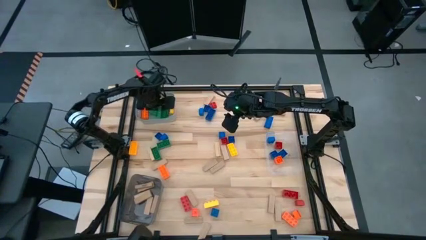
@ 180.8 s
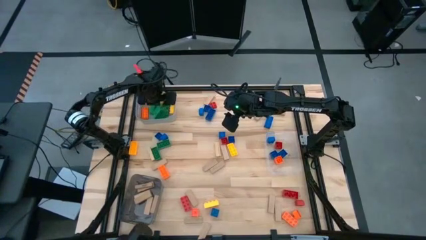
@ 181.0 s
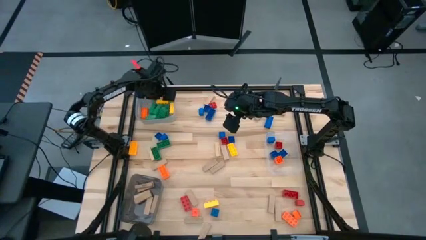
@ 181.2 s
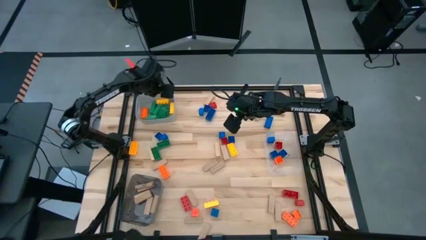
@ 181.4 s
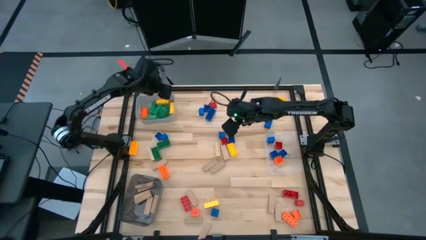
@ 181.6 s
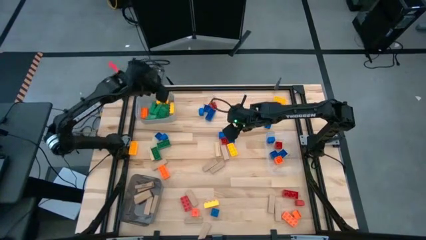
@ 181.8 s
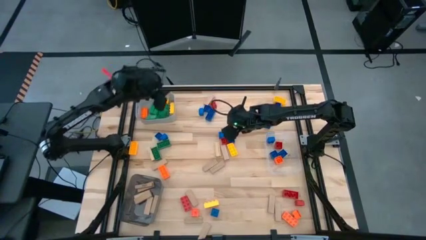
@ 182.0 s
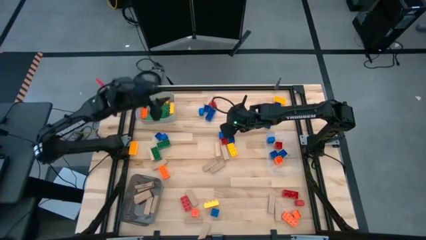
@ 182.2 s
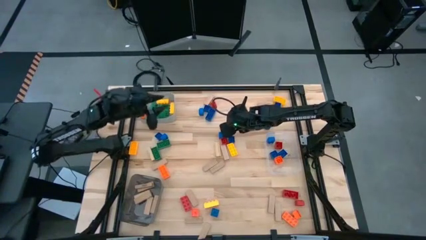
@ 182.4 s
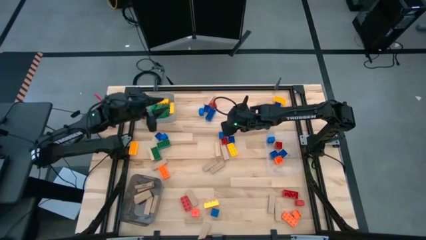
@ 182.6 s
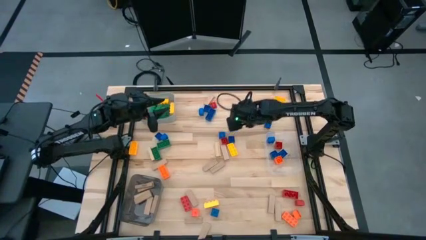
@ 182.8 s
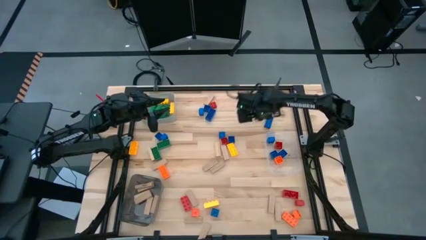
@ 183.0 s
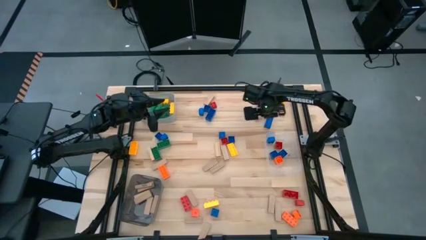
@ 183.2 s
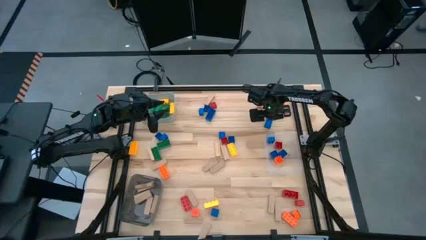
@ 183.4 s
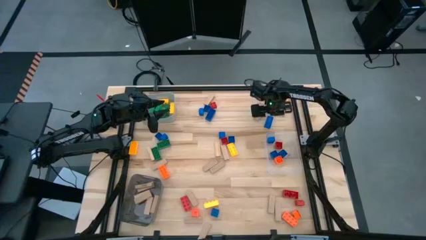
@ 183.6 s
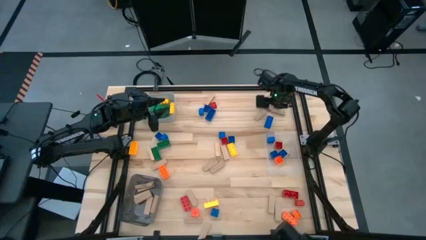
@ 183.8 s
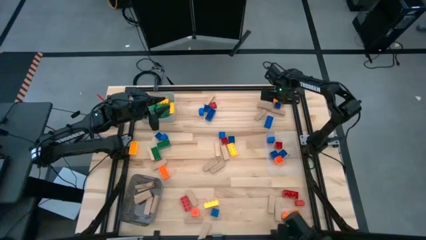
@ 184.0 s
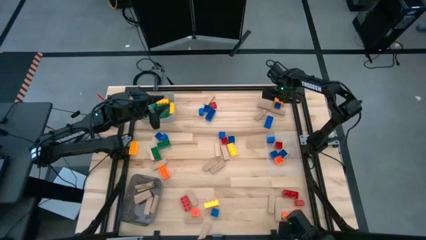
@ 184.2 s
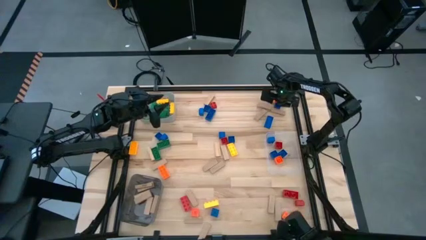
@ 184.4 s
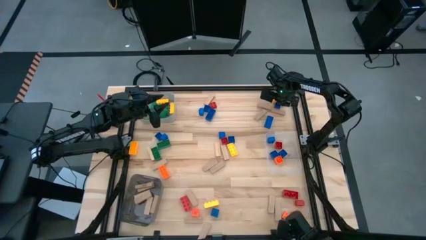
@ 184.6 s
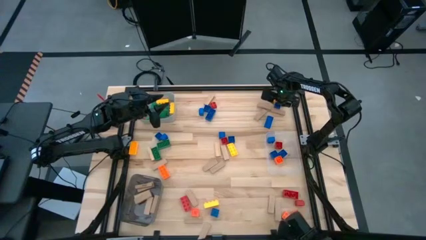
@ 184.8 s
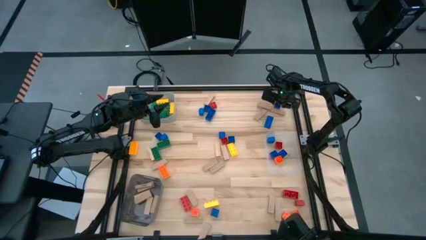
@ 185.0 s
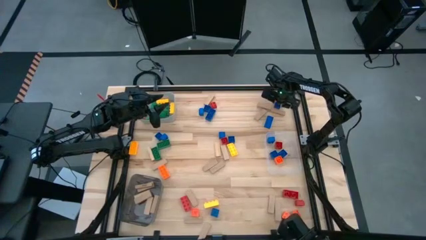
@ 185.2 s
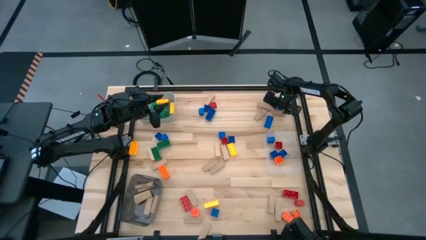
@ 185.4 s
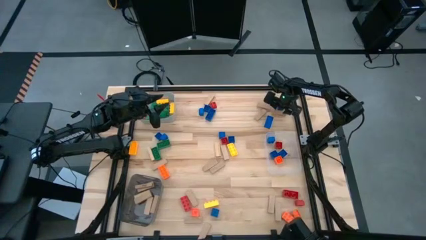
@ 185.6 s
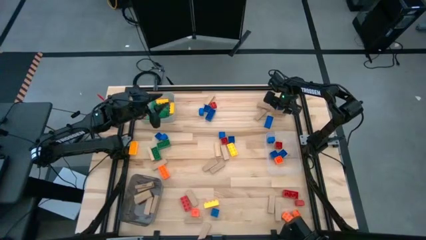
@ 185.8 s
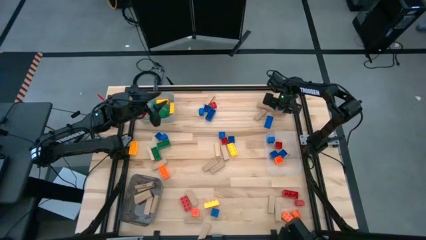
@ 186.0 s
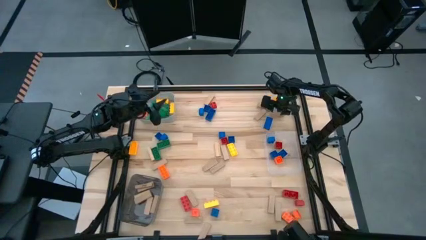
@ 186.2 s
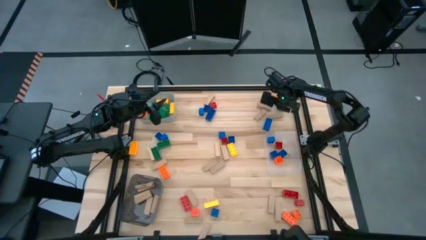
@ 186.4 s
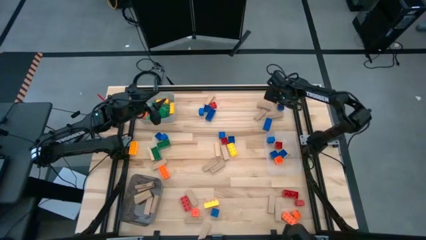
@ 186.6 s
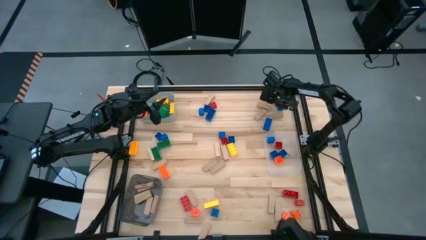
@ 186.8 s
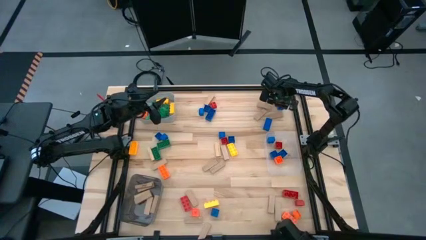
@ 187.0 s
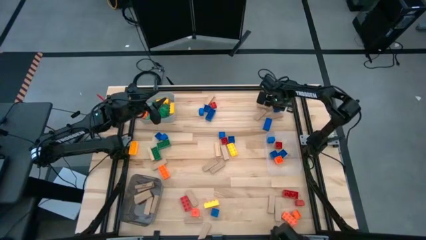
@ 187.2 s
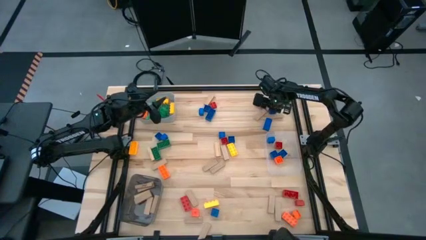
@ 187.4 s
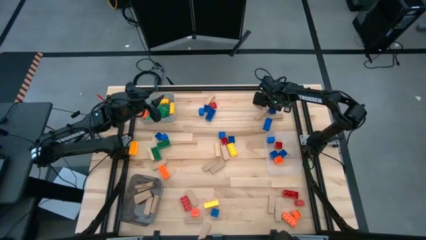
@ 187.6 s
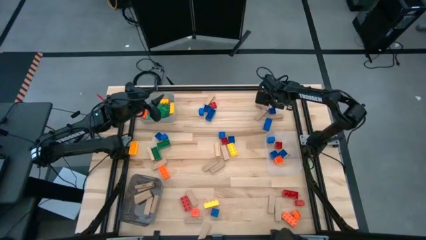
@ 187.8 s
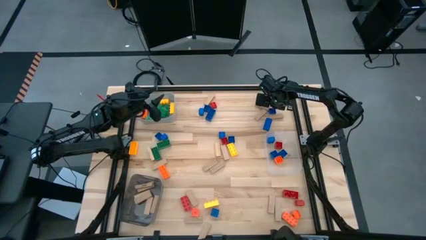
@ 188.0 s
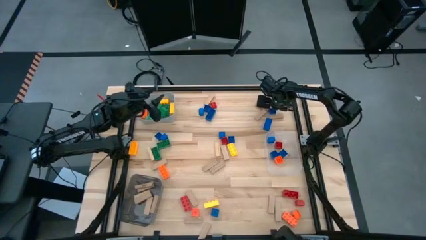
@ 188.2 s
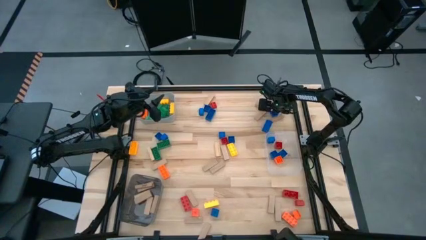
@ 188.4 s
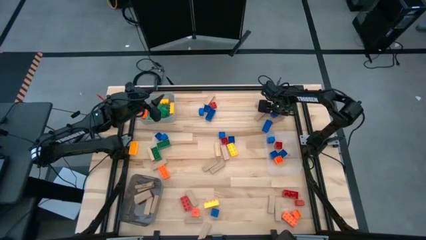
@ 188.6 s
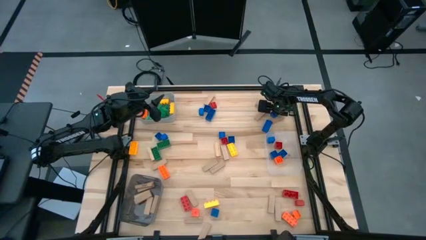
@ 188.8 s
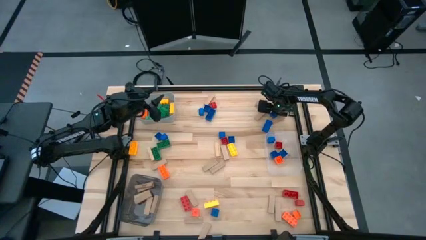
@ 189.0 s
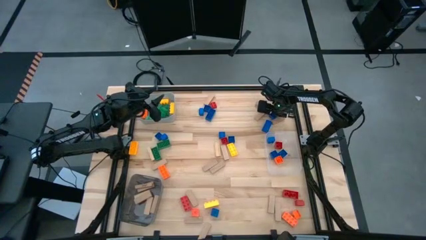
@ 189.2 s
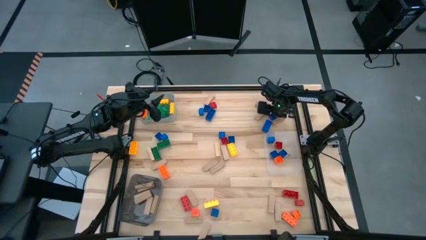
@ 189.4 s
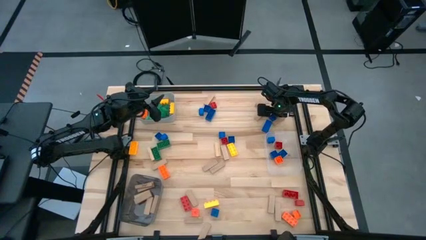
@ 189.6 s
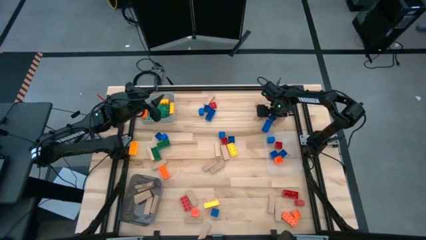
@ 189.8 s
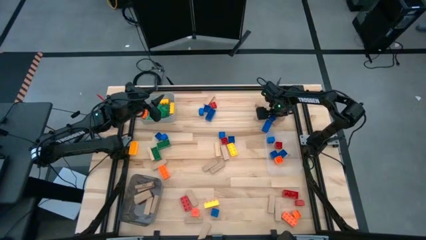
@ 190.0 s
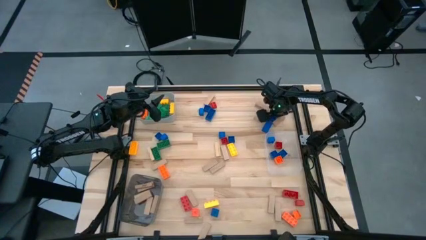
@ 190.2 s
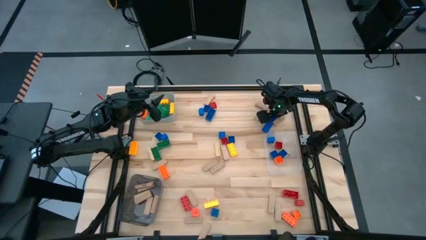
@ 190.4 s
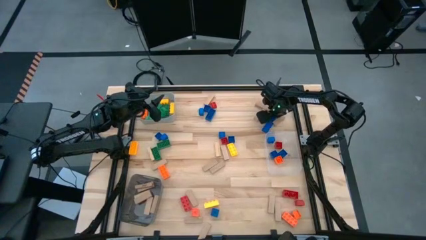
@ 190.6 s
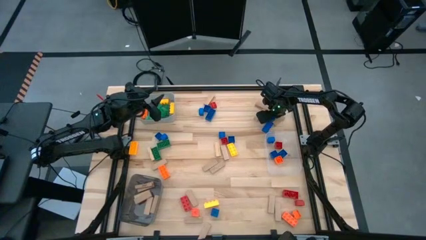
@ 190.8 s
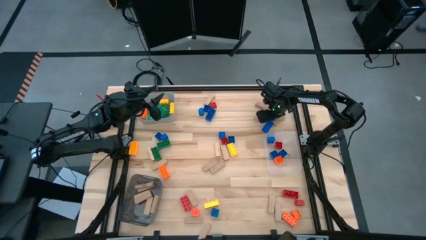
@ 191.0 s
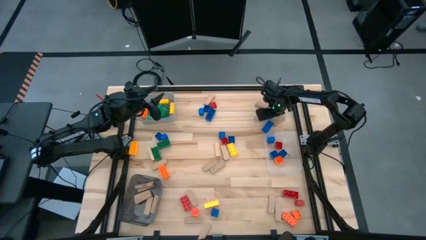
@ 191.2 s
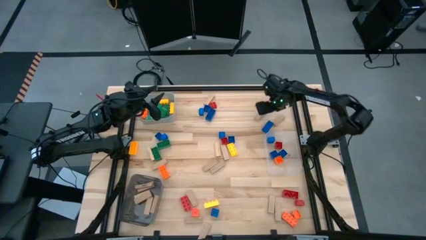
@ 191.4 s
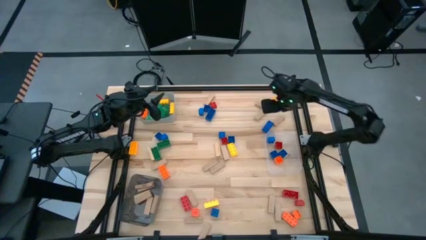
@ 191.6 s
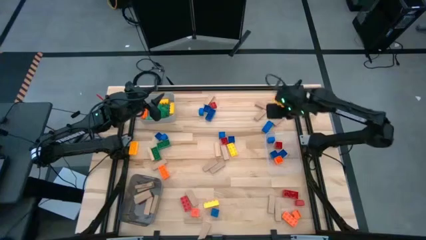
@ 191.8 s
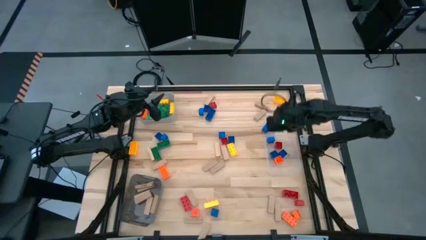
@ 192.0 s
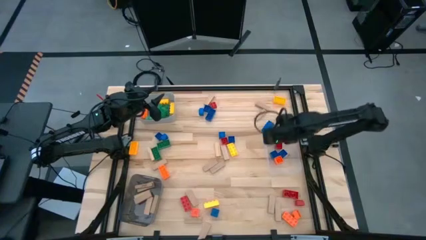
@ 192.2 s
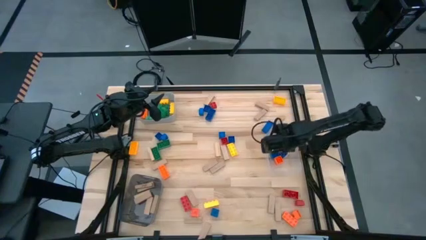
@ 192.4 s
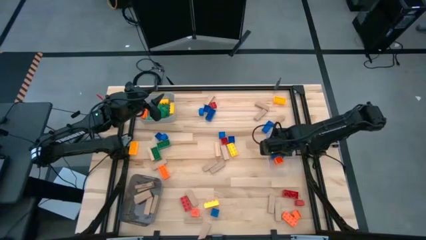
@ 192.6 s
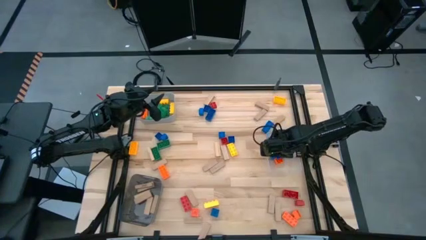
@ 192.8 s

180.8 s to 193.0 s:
Task: Sort blocks by size
Put the small blue game piece into the transparent bin

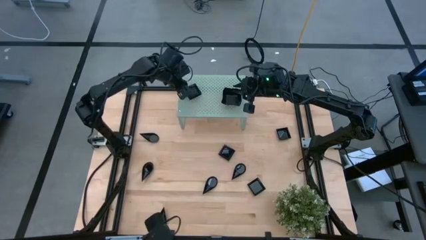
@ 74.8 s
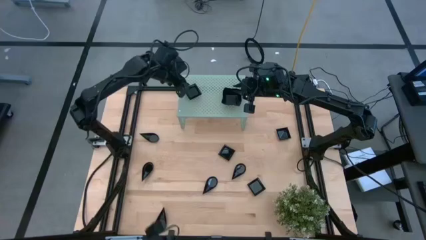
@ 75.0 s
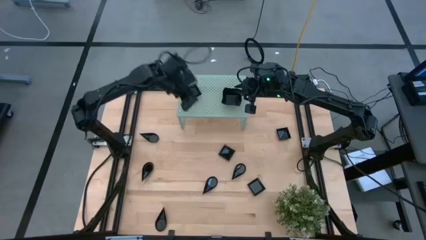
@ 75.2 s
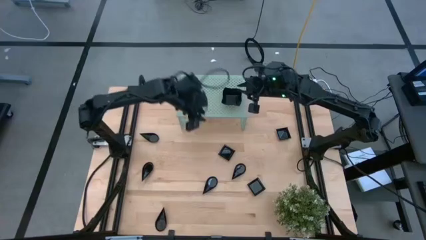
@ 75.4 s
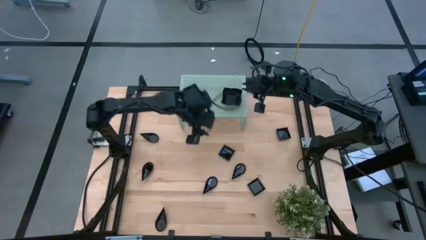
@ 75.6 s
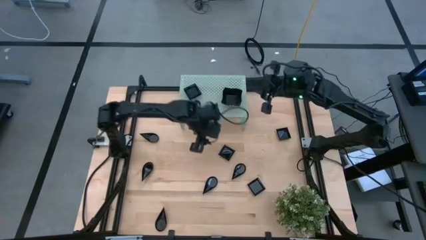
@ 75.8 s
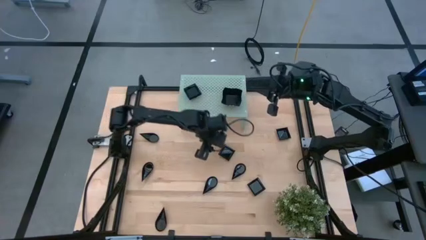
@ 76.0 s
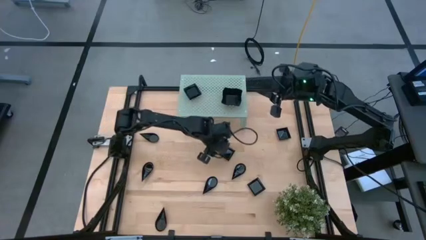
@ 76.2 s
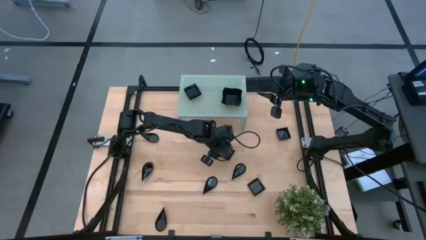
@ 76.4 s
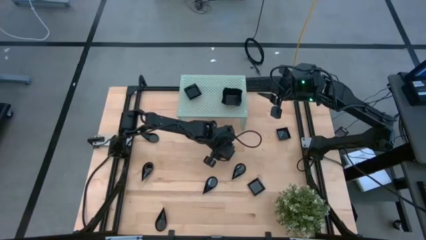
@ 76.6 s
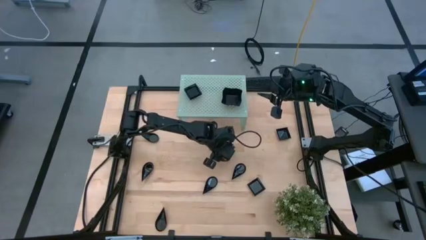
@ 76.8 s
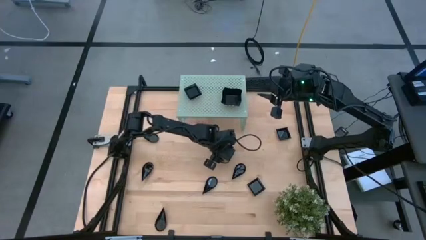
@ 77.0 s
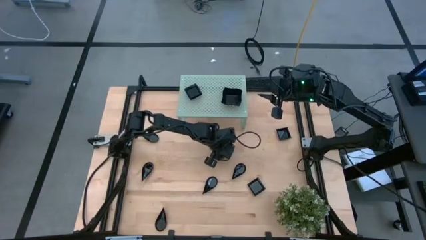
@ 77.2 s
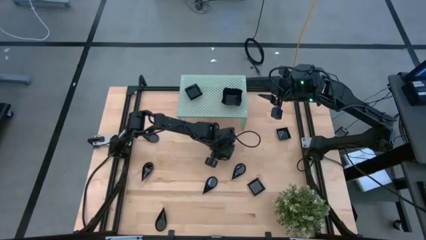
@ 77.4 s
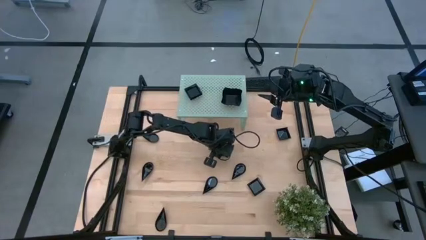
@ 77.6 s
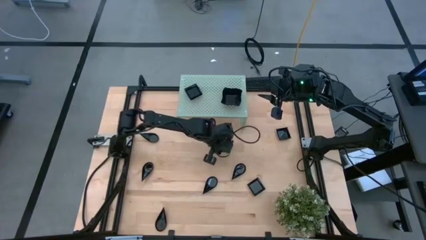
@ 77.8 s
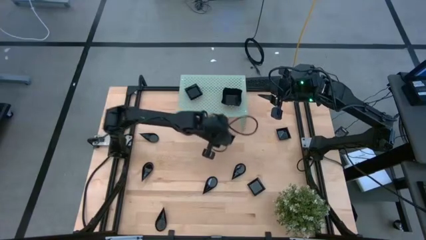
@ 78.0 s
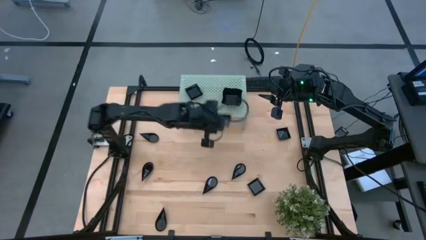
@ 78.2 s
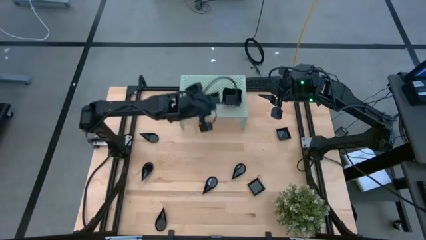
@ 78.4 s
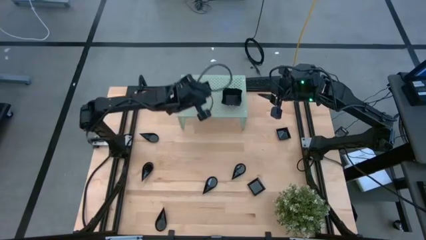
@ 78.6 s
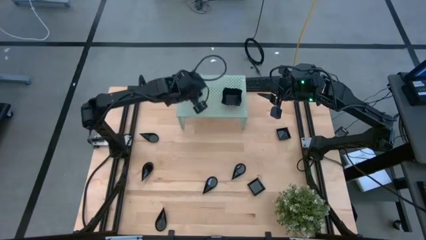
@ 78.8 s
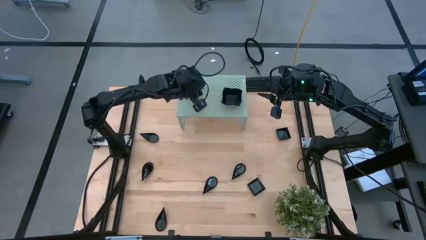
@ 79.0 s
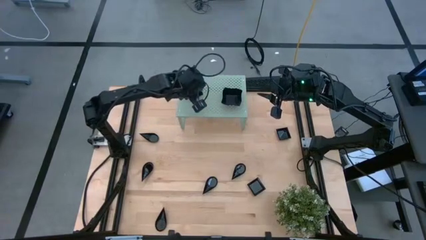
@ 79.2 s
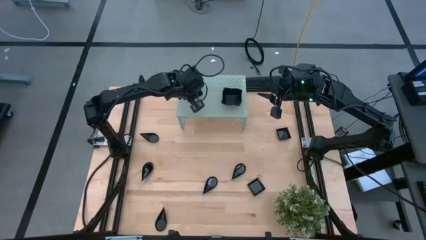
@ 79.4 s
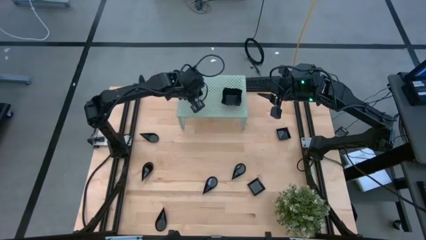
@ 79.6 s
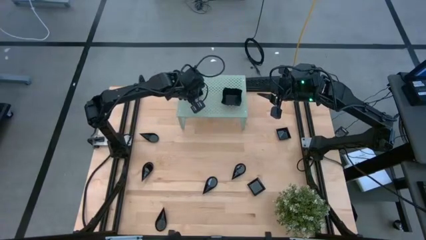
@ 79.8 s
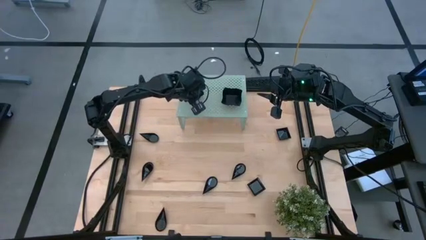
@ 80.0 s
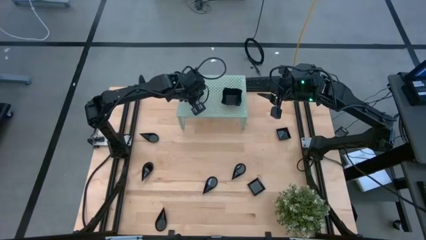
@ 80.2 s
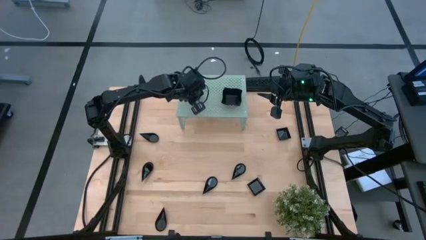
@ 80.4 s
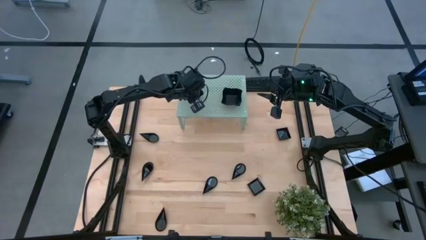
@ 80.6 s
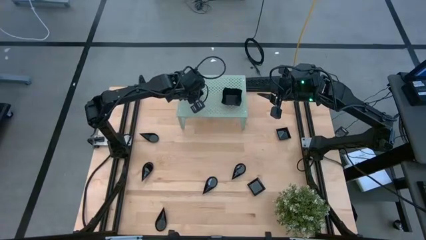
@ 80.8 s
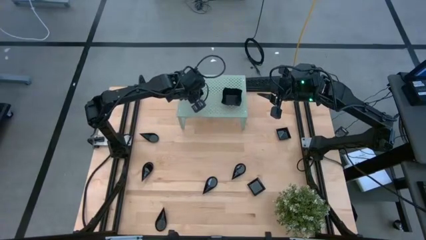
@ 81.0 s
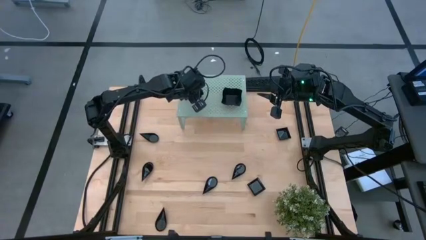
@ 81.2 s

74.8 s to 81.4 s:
Task: Pick & Place Mini shaped plates
Stack the black square plate on top of the other black square plate on the shelf
